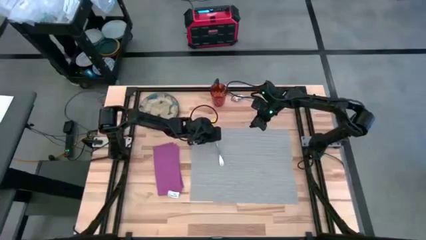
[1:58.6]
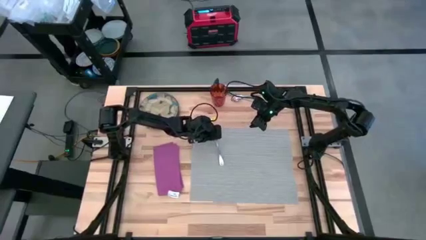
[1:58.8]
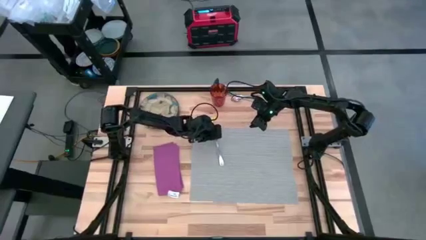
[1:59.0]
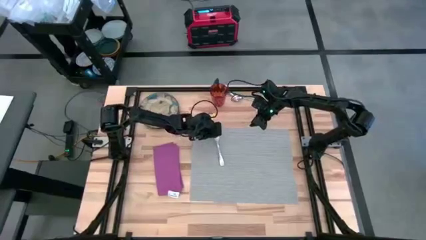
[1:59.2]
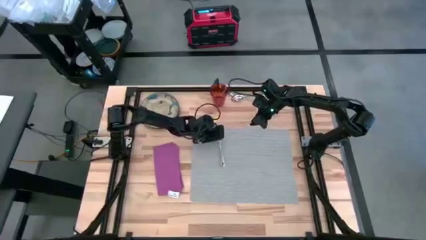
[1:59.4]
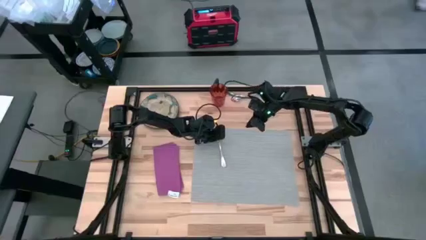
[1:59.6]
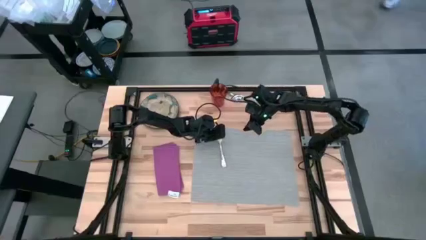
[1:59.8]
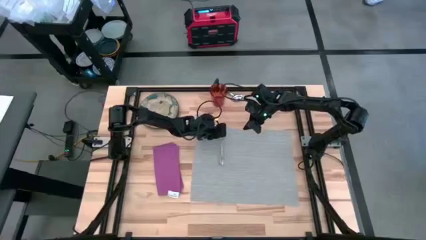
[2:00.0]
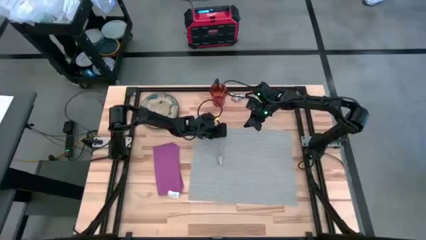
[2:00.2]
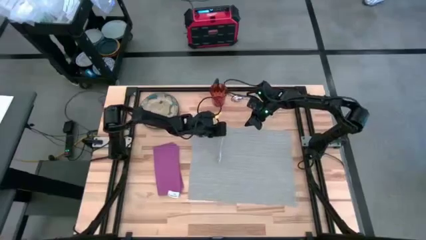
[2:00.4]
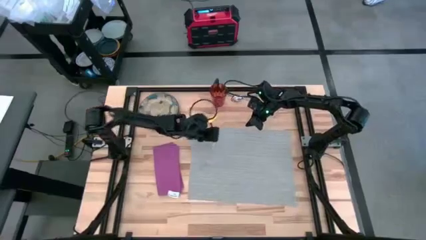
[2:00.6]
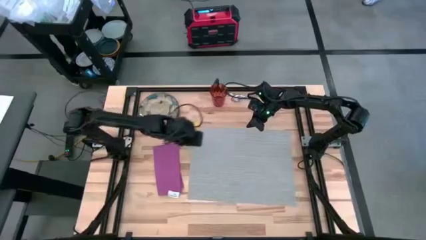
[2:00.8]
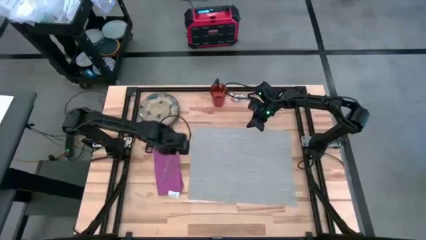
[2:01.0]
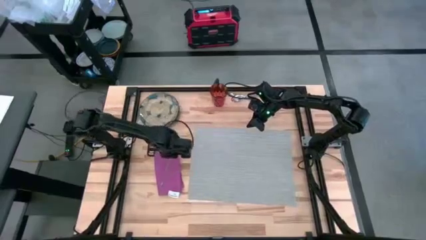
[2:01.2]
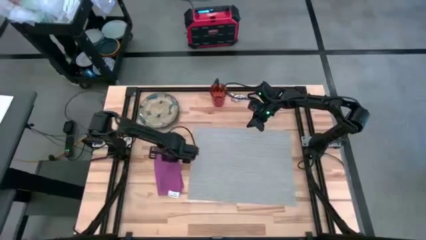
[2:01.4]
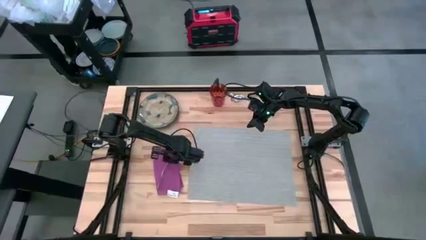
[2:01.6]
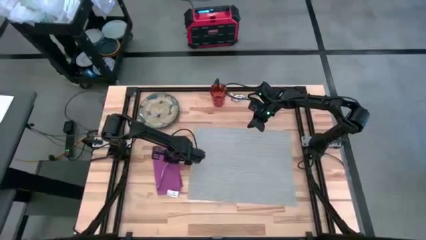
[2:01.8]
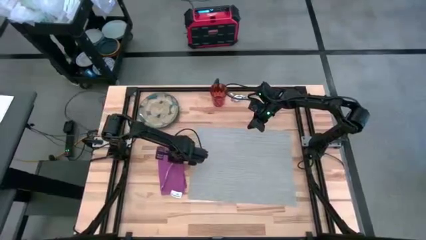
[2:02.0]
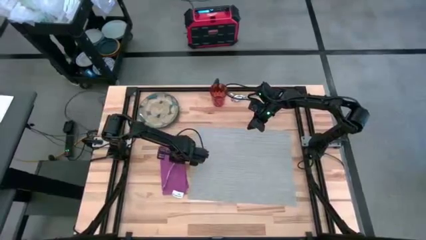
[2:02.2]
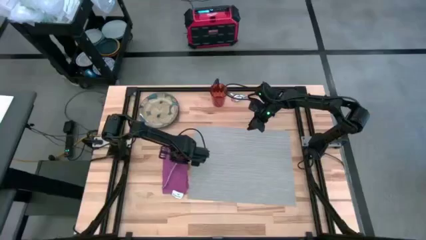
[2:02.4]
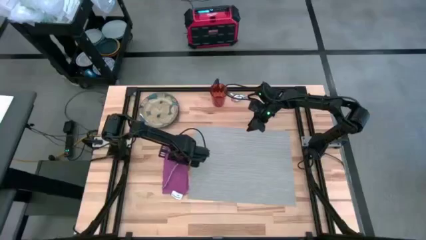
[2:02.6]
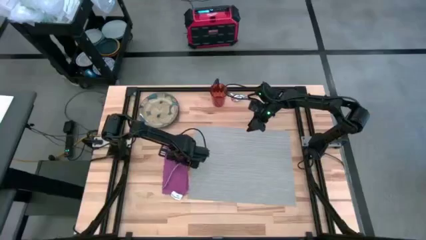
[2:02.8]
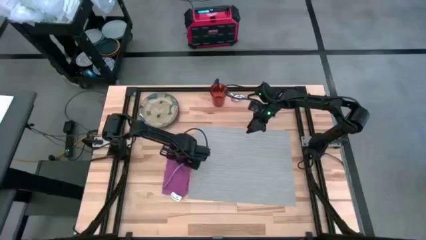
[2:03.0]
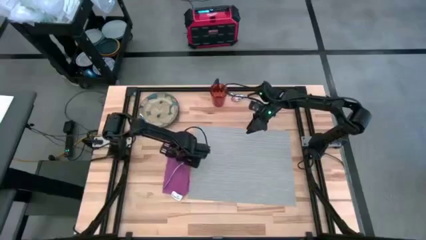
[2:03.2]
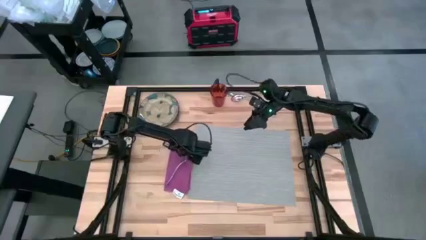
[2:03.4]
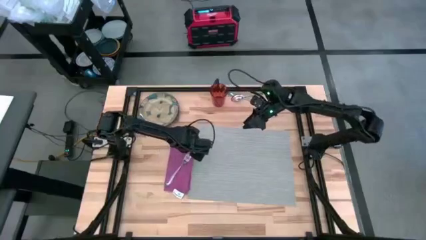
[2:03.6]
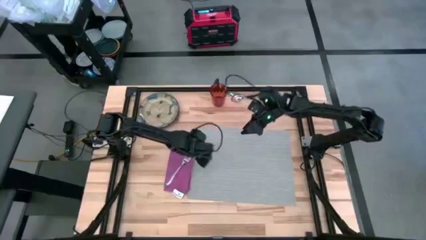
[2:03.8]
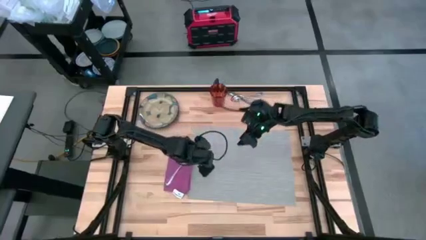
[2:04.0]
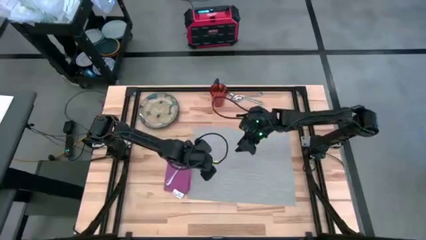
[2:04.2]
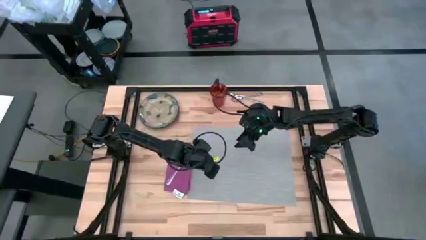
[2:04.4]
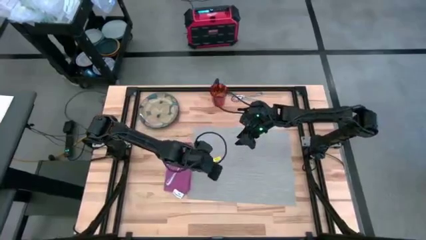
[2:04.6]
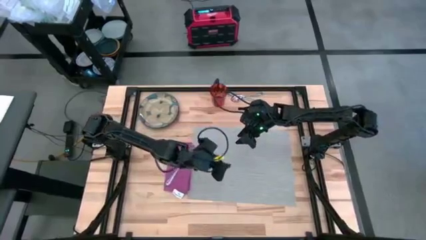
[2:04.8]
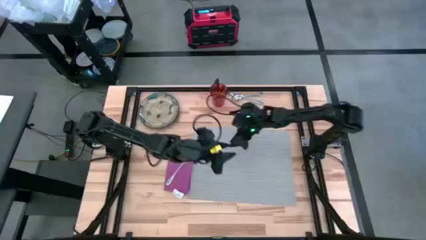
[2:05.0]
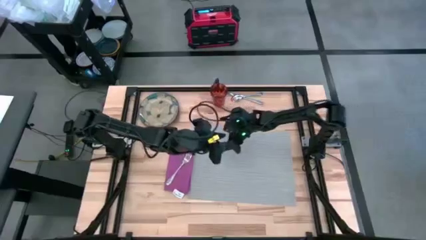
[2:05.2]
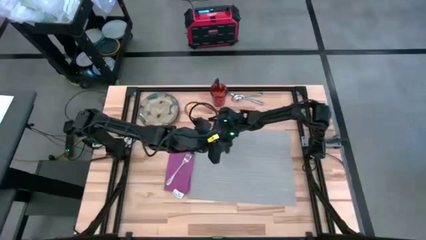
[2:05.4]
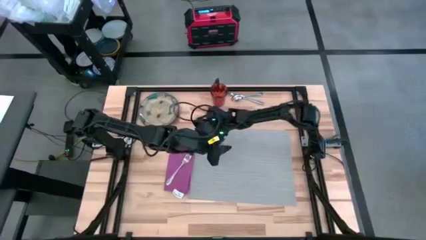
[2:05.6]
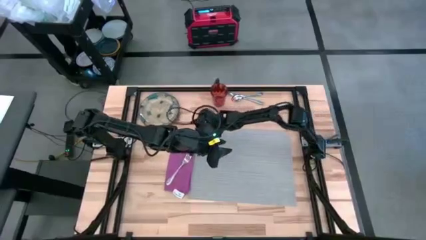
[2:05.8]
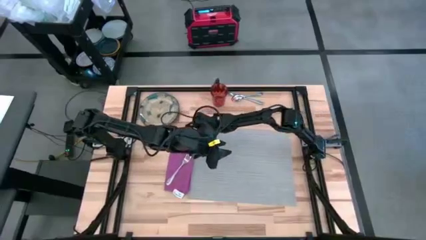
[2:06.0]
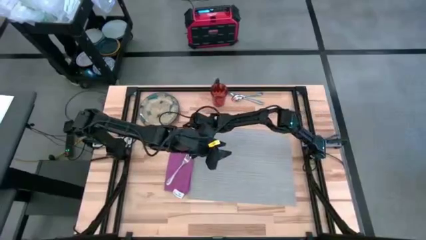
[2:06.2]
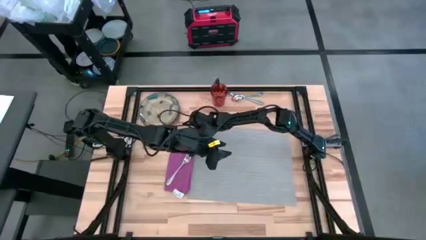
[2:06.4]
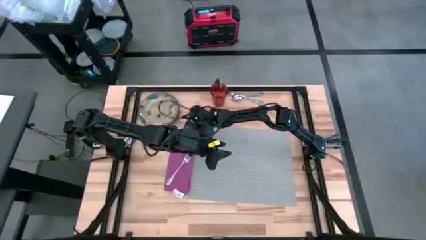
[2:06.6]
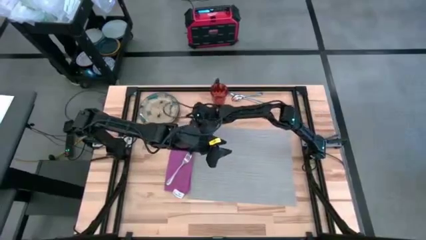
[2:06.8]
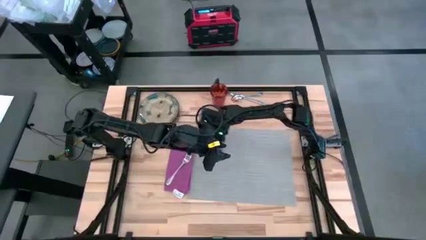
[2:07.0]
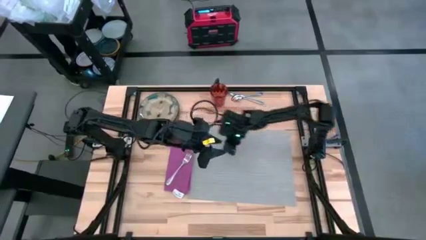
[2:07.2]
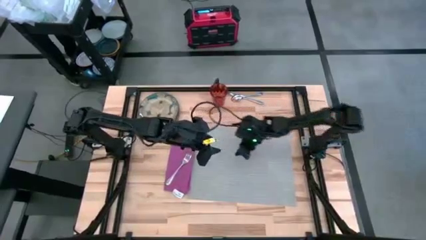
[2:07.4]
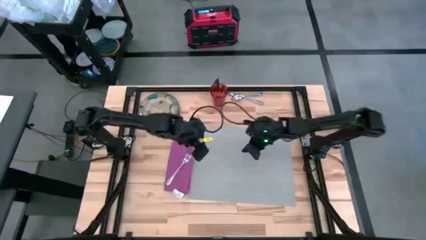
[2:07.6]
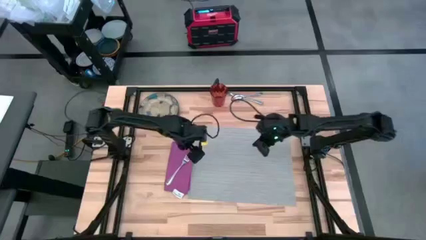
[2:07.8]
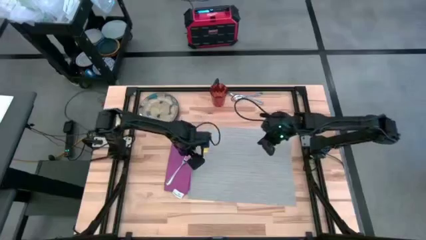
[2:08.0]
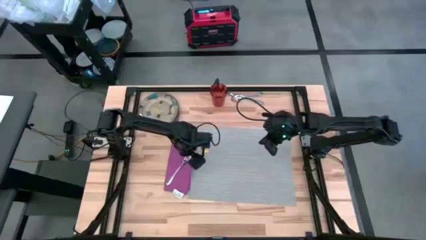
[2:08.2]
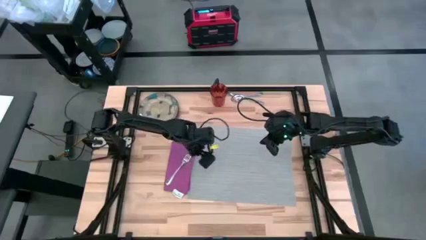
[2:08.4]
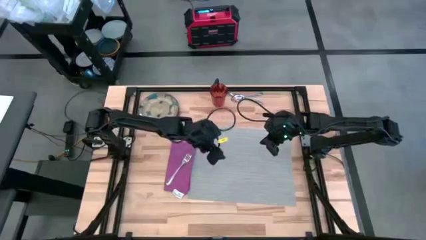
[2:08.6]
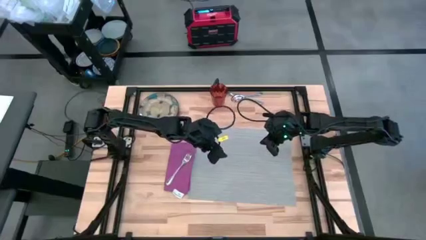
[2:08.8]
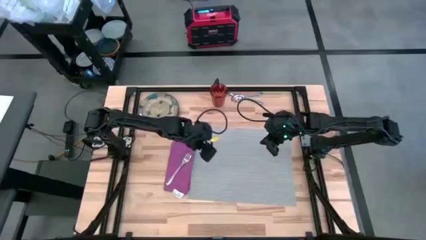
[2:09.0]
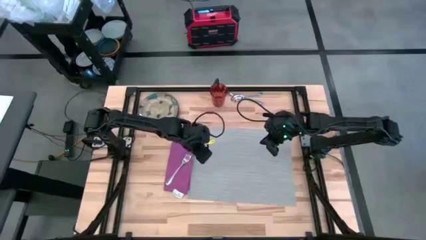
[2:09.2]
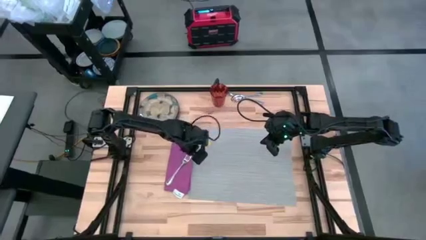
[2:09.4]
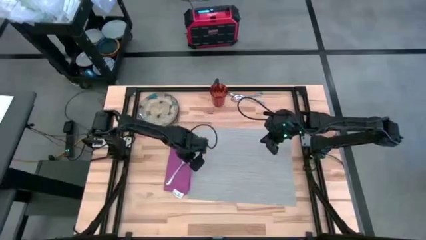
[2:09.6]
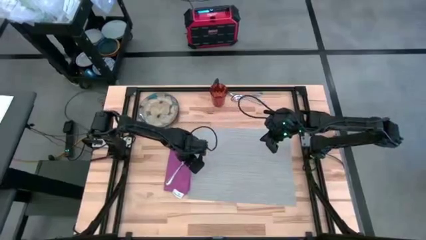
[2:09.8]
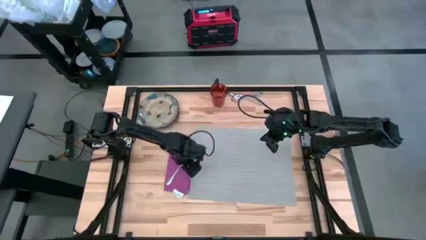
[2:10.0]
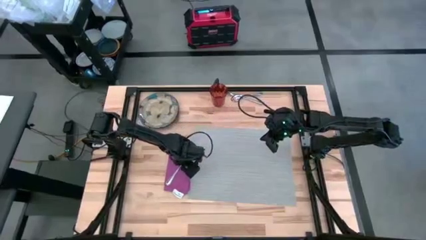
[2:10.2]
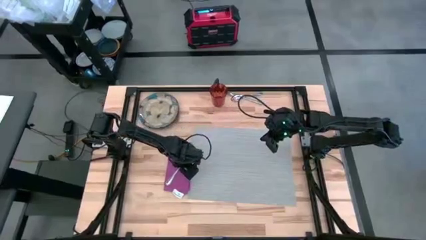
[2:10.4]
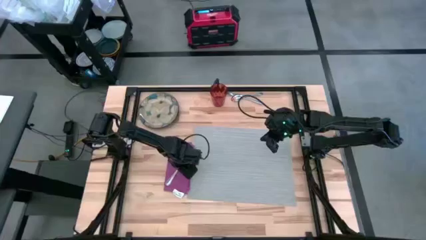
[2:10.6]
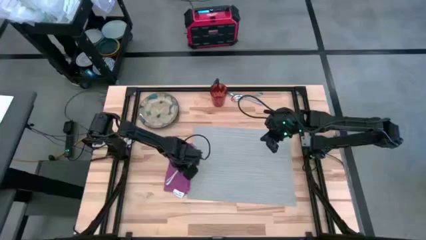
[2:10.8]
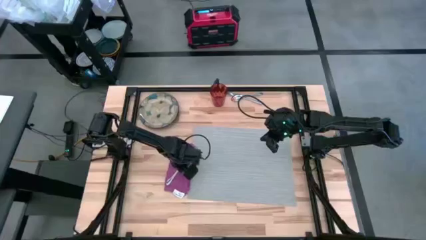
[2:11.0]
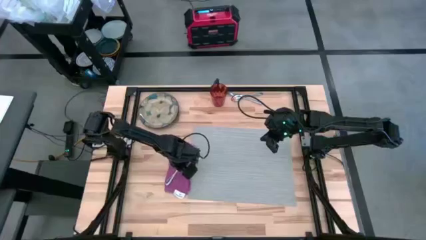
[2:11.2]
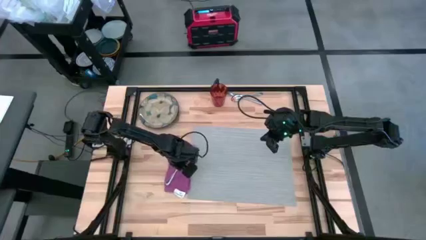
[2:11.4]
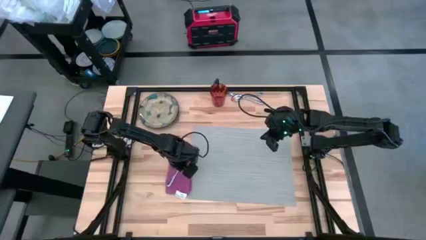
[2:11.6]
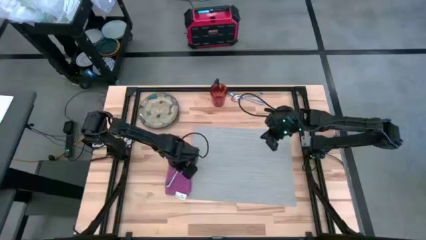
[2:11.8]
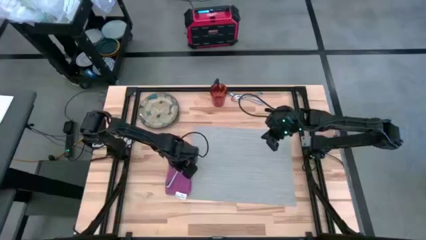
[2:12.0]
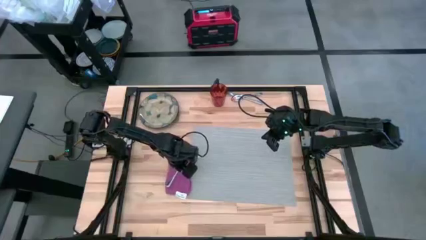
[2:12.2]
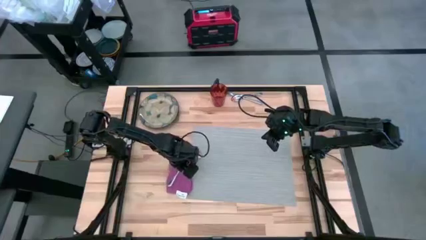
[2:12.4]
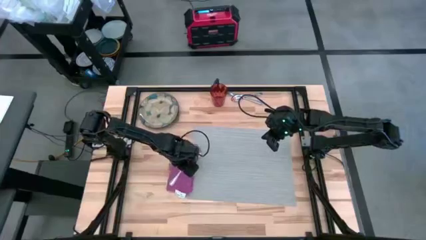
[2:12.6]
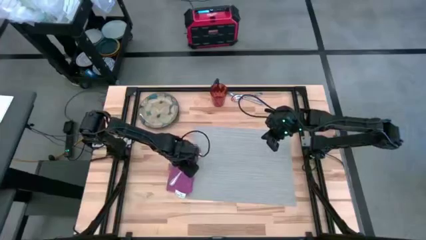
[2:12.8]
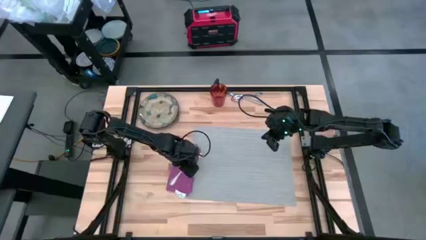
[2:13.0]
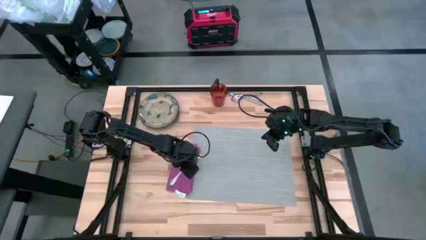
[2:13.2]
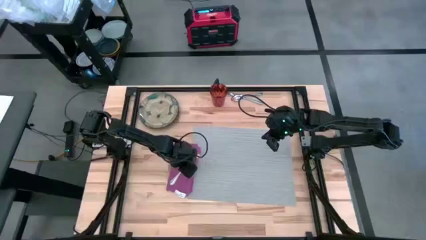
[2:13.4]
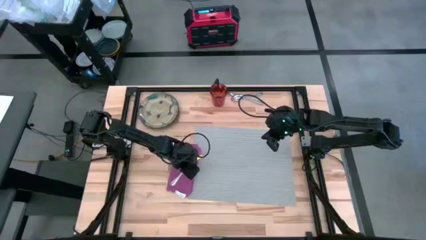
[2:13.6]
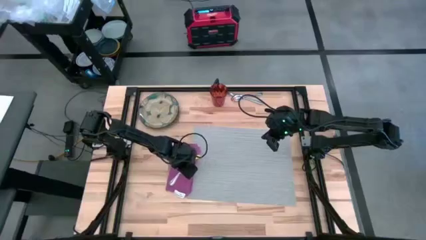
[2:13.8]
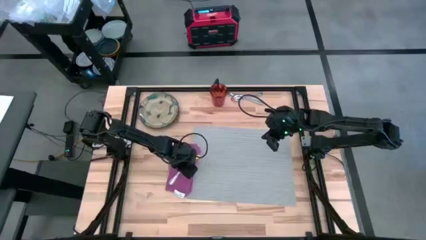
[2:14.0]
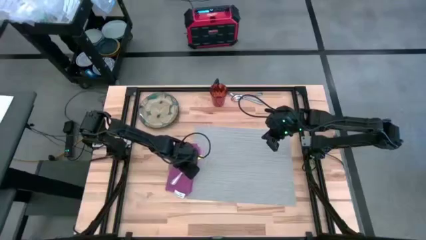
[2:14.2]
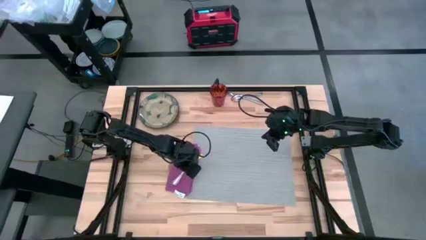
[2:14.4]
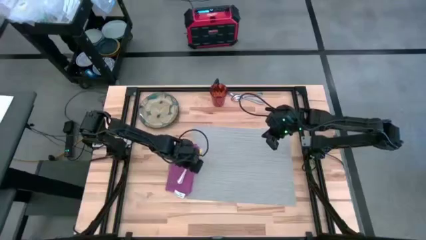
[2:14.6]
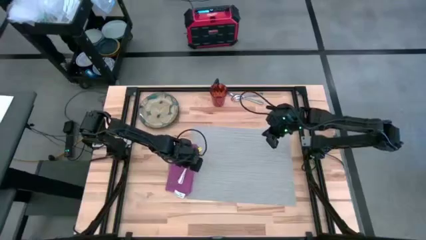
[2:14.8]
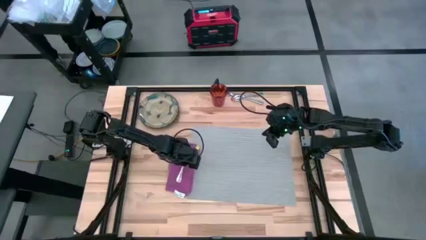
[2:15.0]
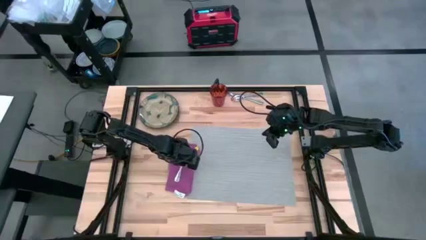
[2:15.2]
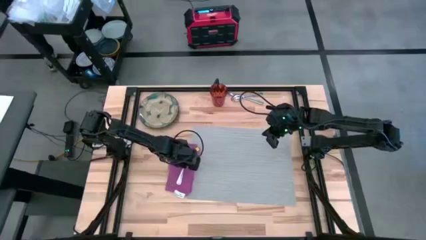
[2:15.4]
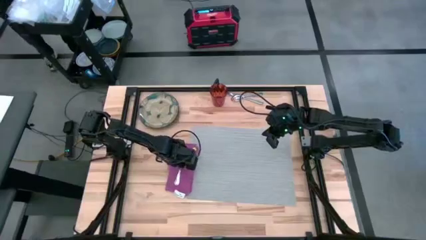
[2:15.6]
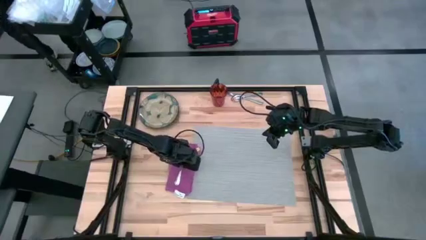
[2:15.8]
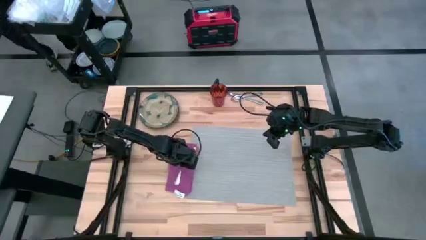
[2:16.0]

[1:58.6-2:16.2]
Task: Set table place
Put the fork on top of the purple table napkin

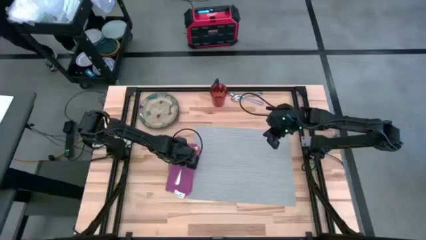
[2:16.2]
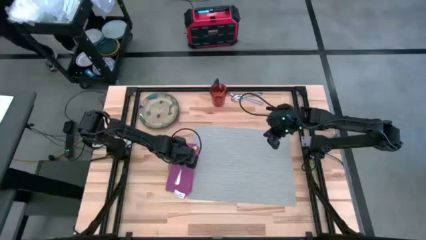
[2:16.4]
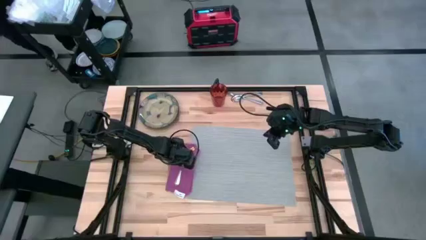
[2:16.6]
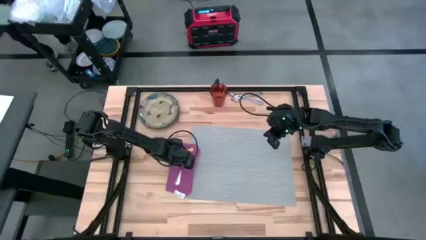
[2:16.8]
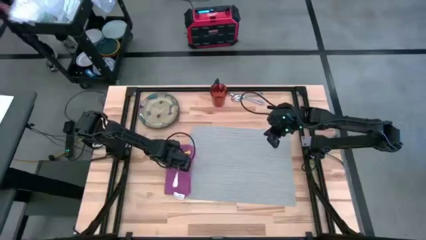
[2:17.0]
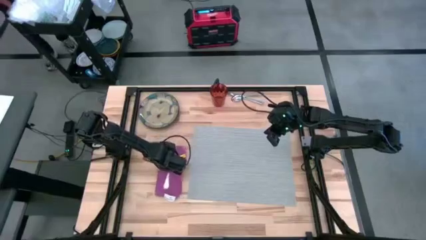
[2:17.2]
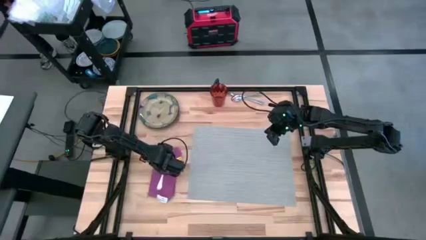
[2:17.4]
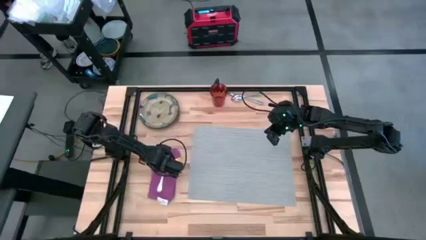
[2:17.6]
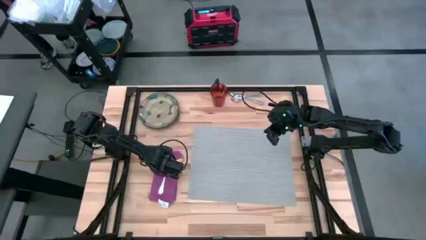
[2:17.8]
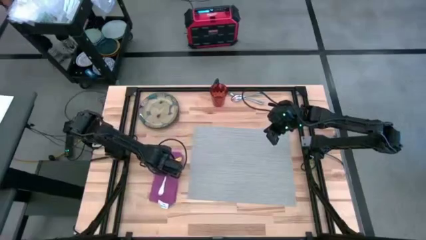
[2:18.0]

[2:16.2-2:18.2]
Adjust the purple table napkin
